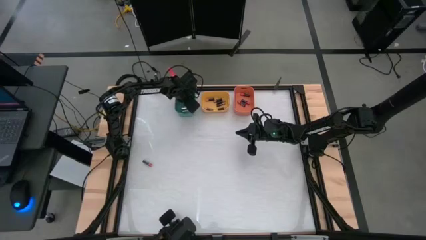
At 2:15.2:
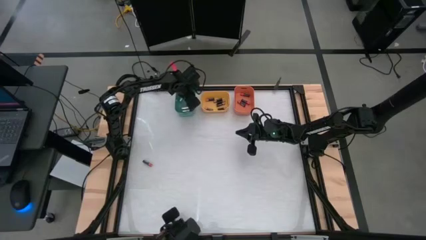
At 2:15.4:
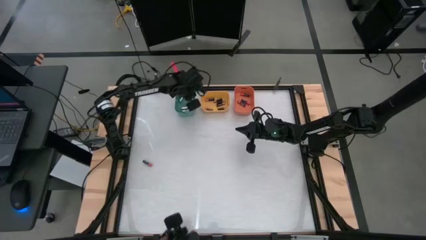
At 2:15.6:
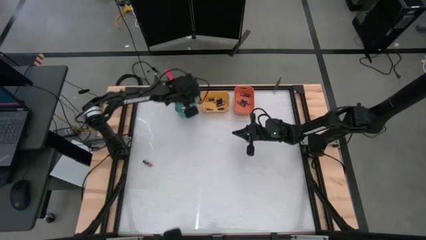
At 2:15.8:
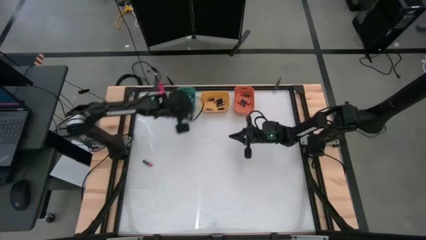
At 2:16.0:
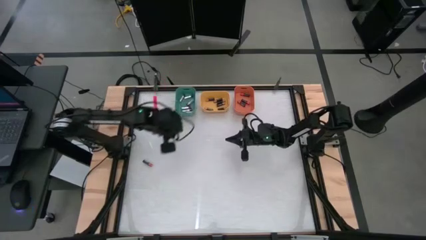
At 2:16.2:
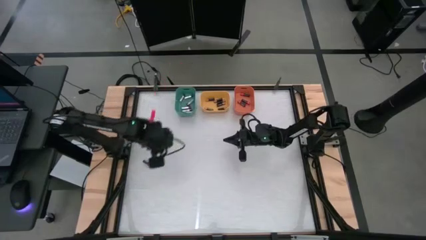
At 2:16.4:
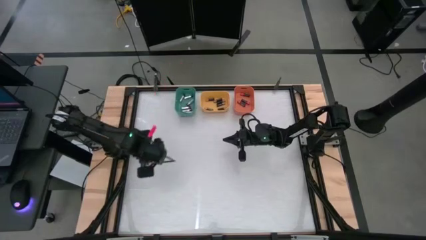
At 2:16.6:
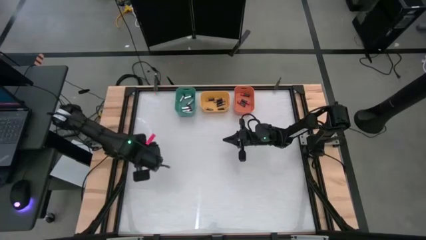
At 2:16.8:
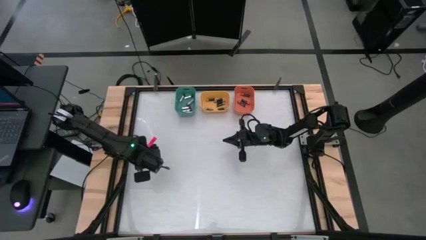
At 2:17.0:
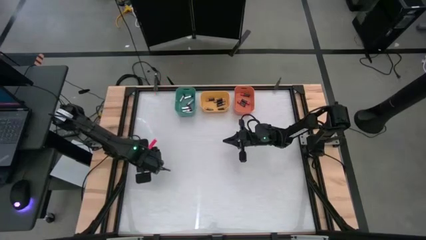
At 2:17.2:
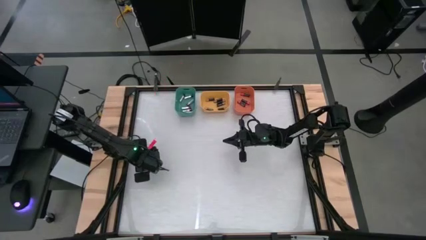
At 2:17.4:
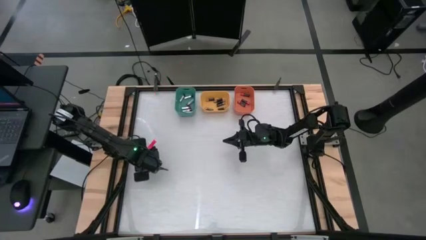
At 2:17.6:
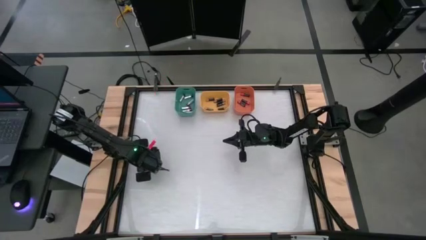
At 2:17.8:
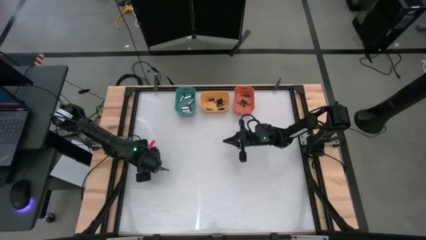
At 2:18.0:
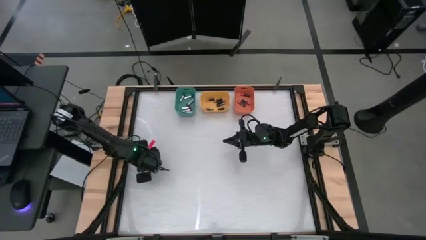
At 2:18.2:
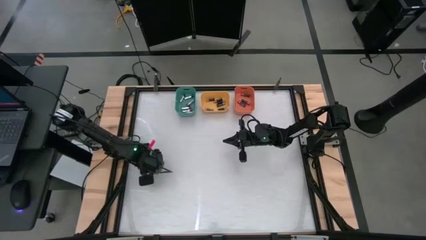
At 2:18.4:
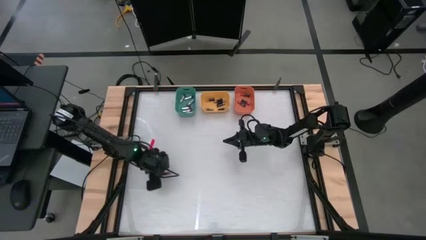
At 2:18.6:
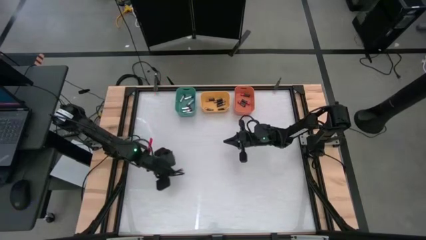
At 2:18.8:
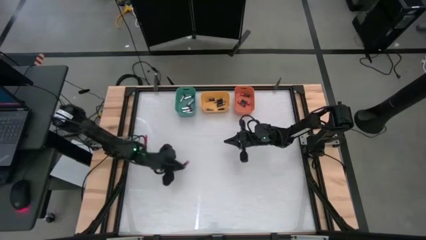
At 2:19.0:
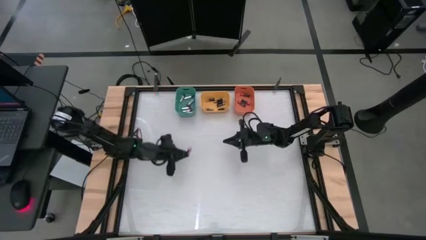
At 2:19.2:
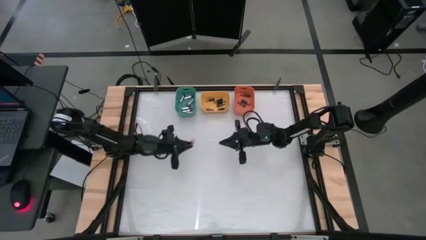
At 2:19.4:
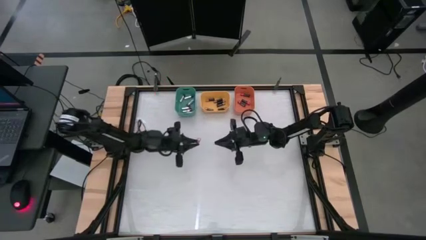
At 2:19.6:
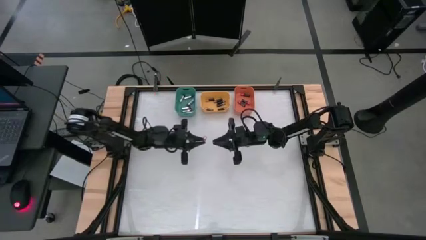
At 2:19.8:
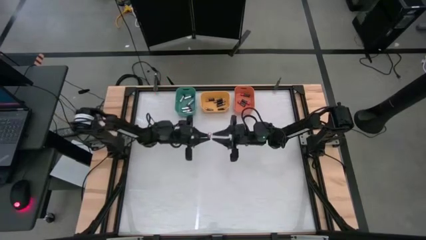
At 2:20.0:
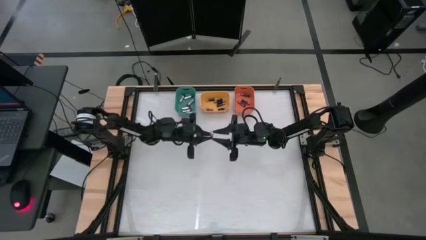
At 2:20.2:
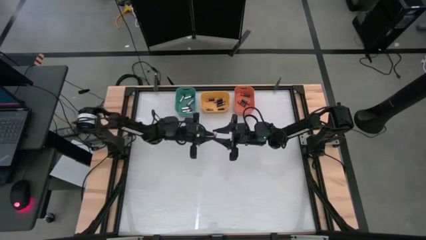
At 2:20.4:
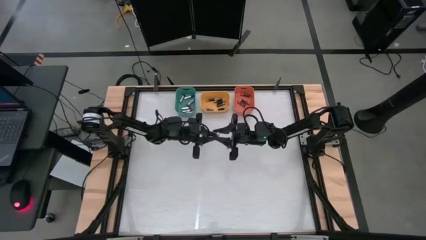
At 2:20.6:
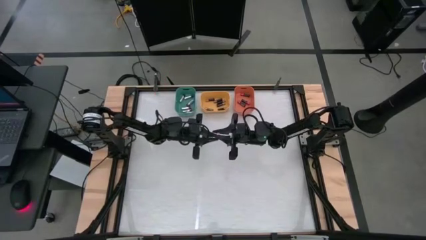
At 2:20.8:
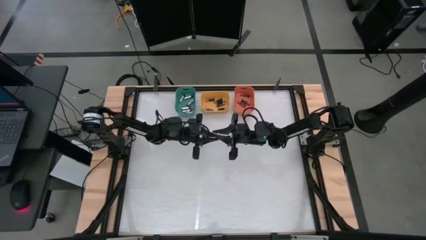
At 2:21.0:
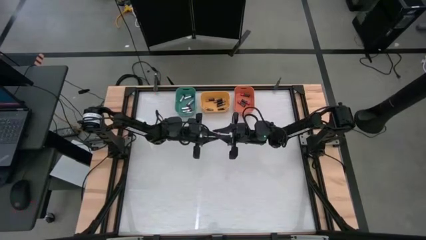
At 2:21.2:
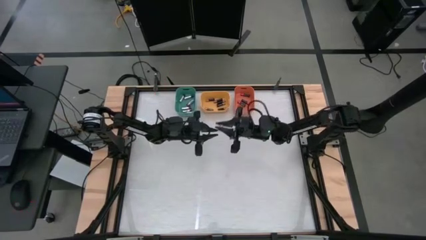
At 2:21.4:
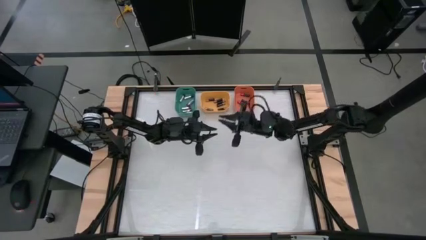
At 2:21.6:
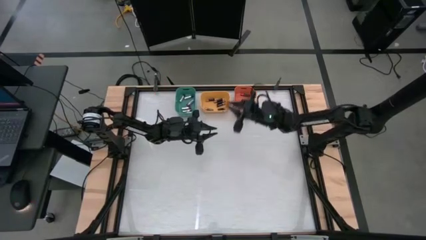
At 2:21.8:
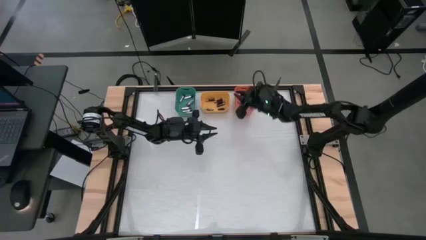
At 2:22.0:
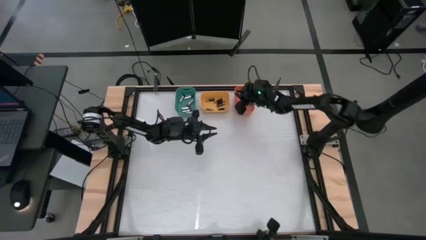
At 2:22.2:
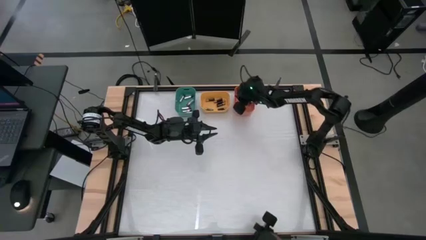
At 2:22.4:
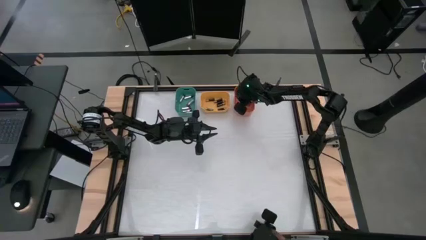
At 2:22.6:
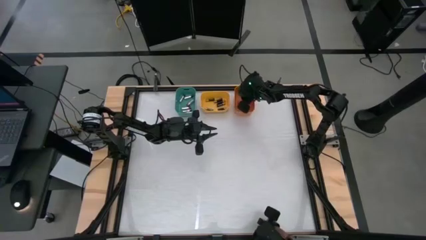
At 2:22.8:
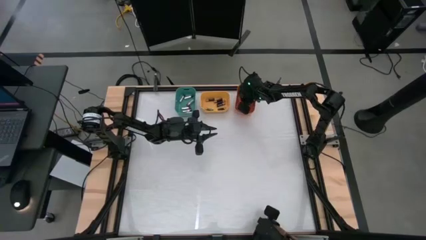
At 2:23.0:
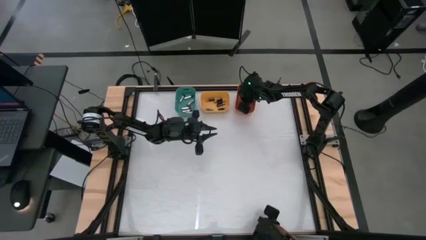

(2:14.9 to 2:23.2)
Task: Sort batteries
Put the red battery into the orange bin

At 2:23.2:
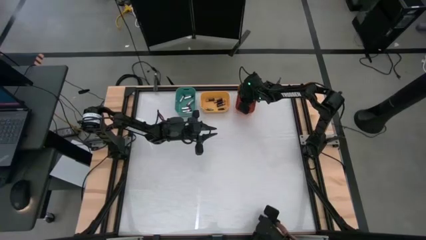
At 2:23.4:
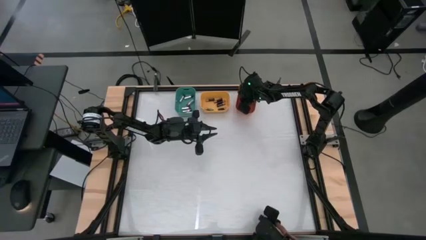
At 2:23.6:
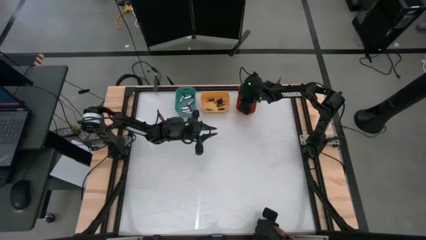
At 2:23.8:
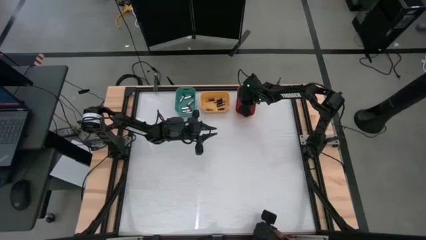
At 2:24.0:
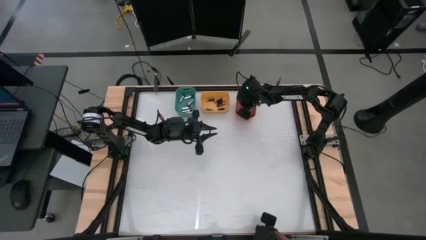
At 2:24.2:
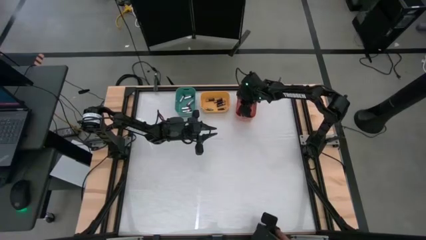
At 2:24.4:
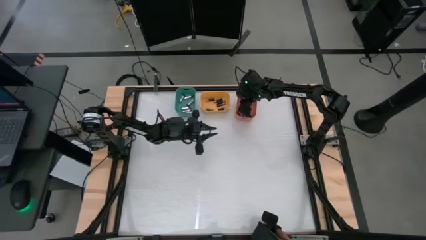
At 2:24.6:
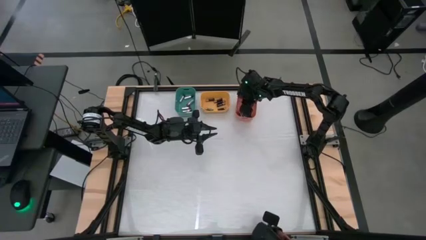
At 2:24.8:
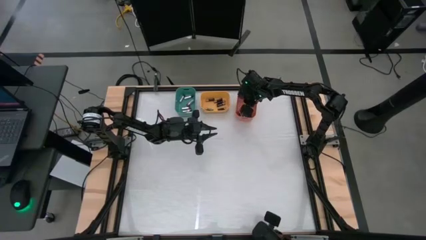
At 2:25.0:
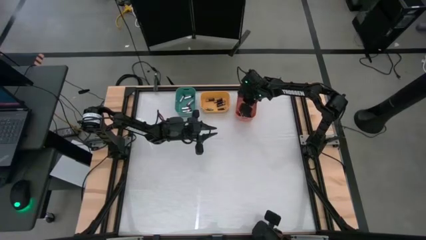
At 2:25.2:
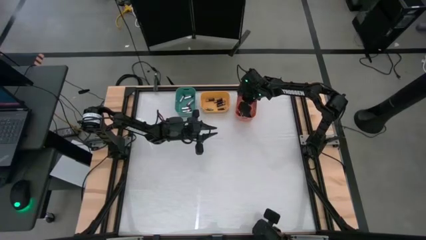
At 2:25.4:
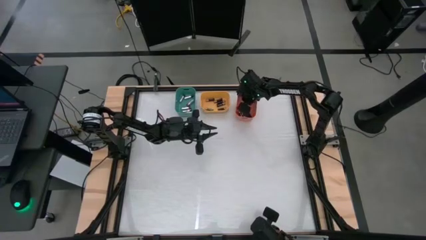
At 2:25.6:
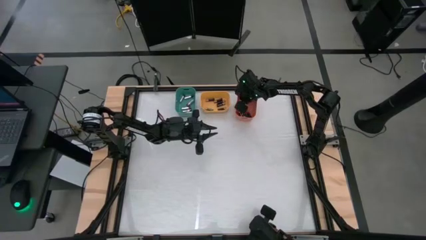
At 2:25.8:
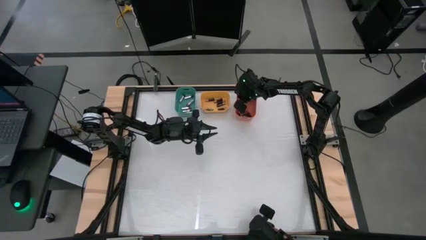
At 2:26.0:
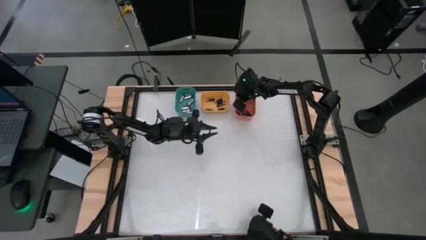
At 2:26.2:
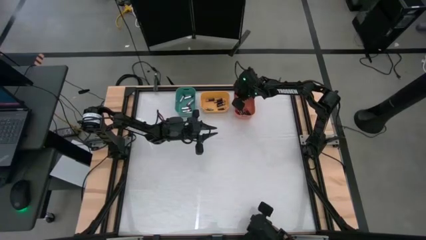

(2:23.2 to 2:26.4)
Adjust the orange bin on the table

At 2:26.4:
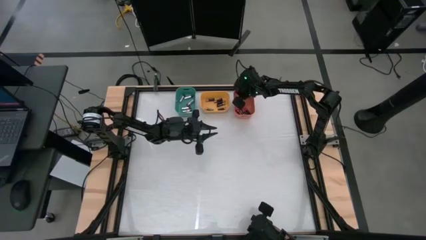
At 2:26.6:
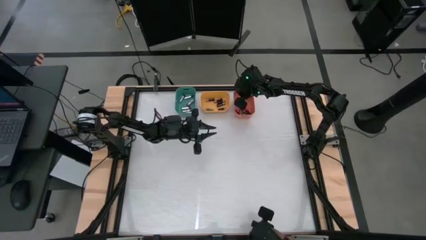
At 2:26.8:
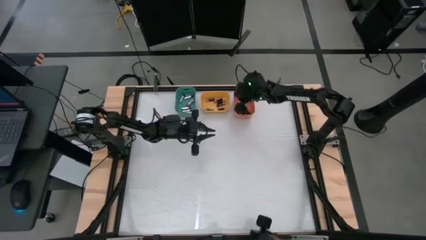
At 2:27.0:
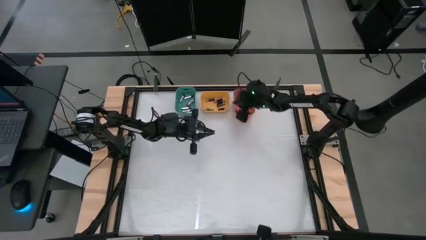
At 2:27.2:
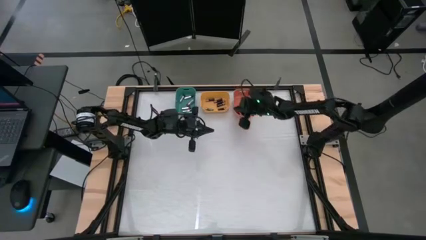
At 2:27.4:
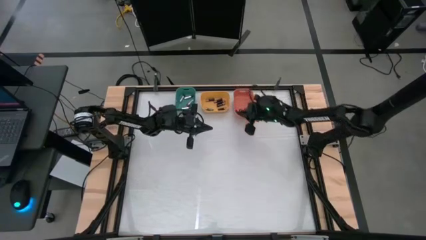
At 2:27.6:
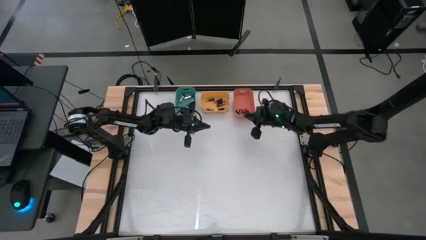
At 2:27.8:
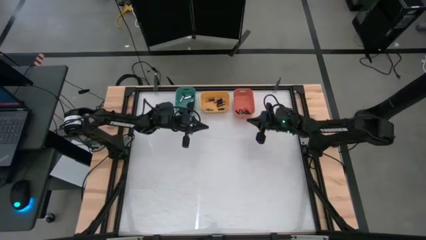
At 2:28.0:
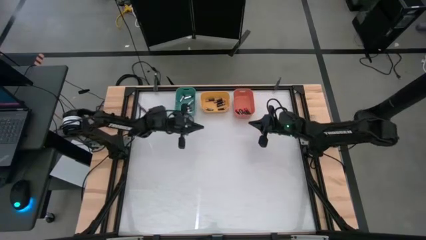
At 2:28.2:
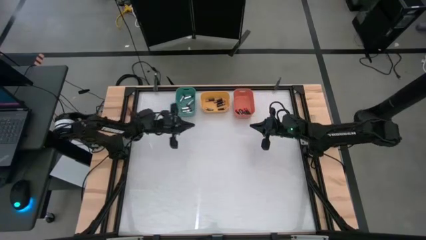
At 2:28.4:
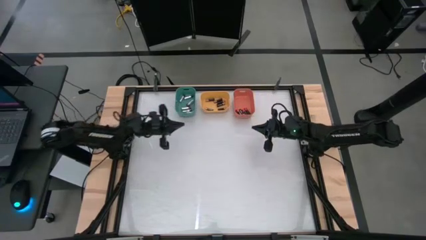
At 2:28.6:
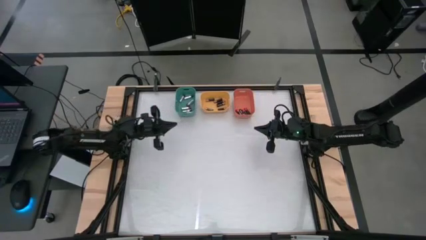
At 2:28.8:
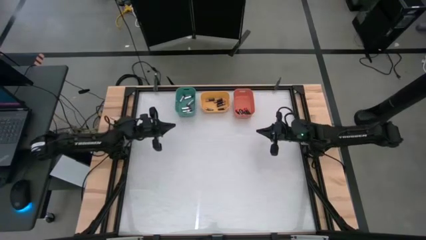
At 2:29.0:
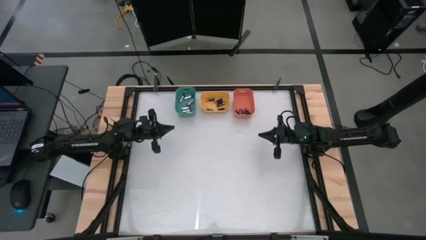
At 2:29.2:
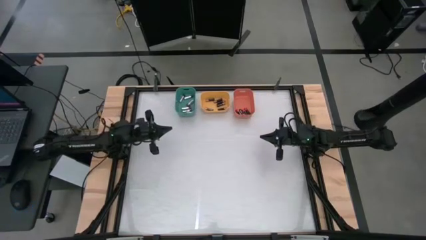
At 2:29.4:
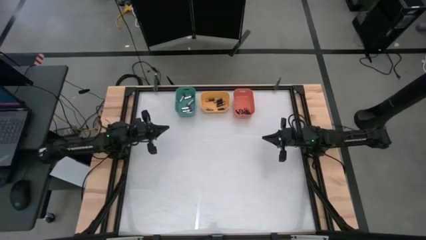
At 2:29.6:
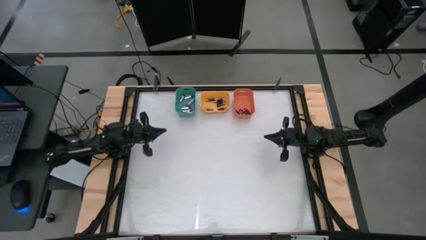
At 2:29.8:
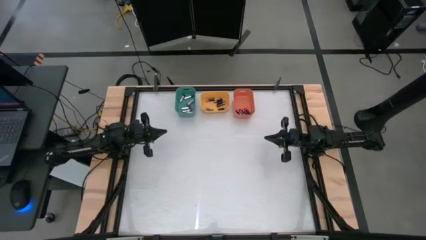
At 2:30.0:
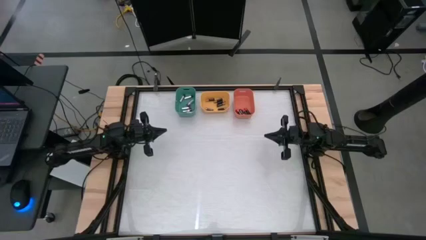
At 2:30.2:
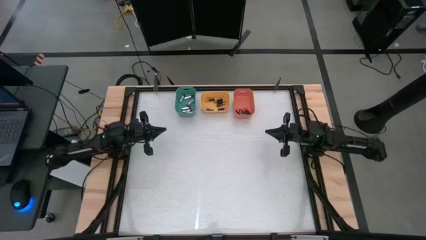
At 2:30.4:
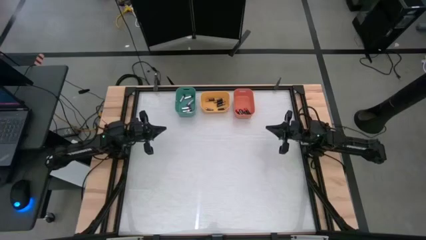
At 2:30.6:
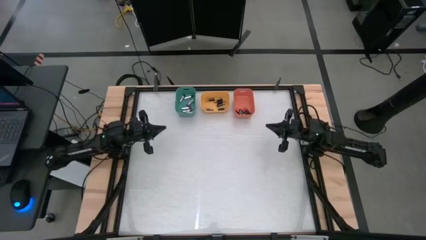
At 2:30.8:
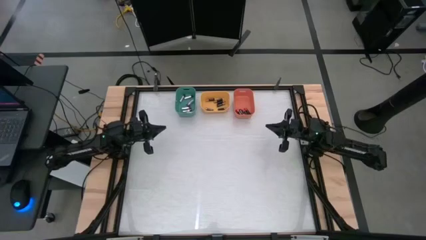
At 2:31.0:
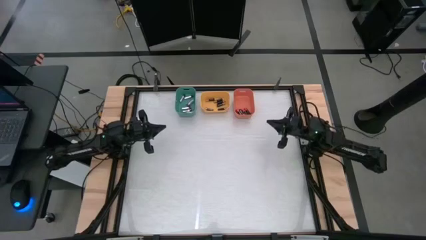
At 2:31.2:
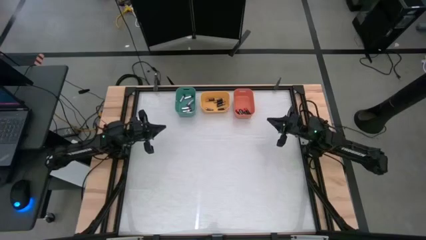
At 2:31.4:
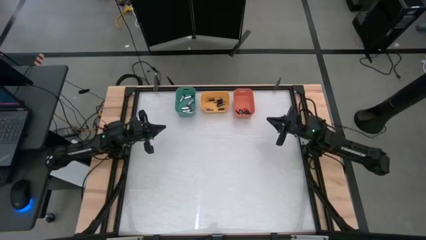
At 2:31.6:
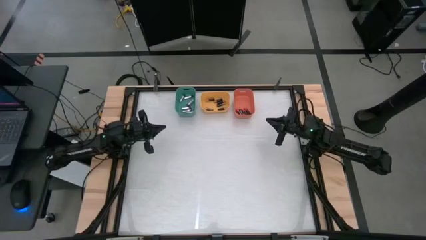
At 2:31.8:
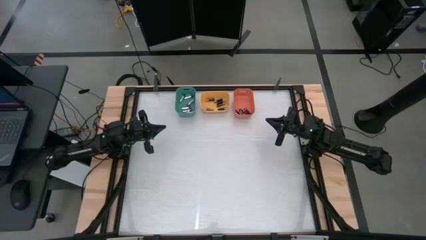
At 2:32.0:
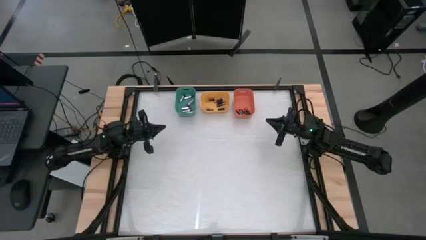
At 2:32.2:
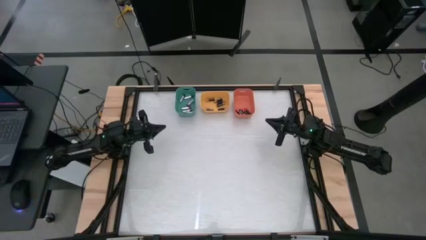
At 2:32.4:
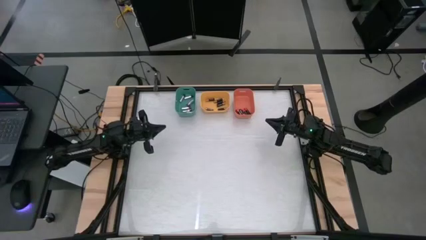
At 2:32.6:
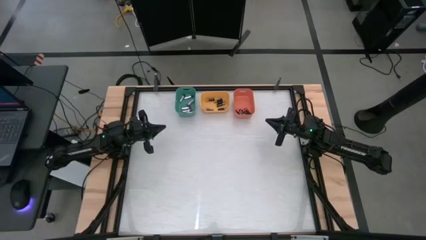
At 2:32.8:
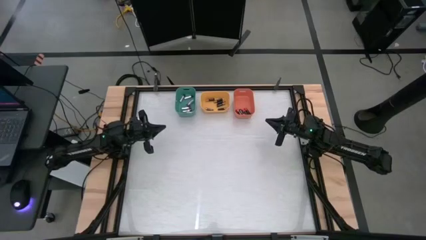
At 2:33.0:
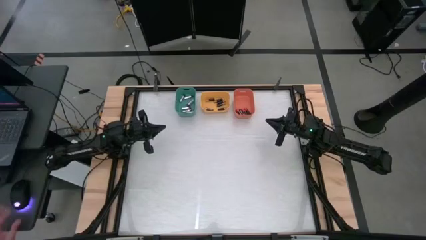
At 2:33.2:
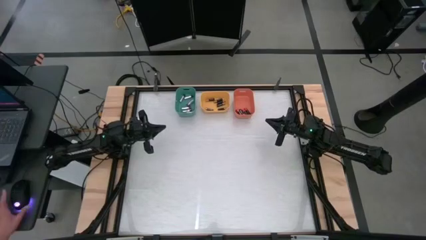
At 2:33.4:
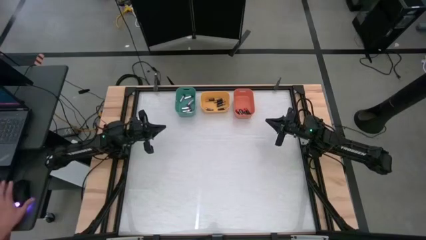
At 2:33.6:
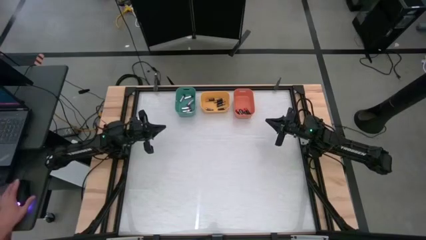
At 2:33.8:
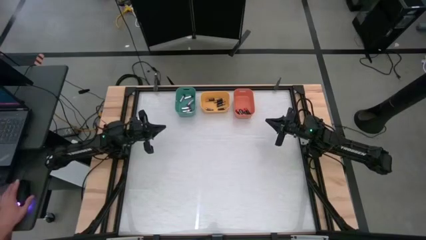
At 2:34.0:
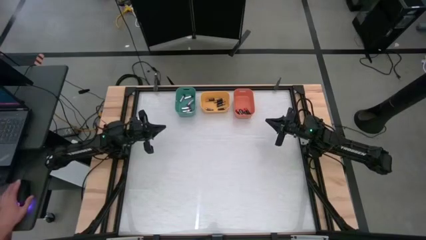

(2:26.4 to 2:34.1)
Return to Home Position
